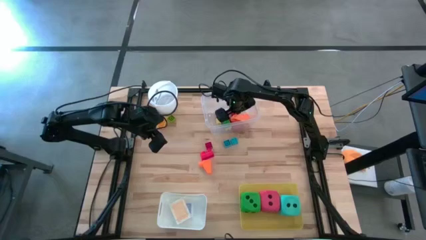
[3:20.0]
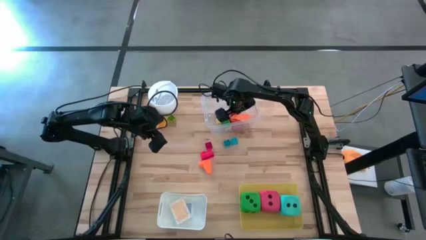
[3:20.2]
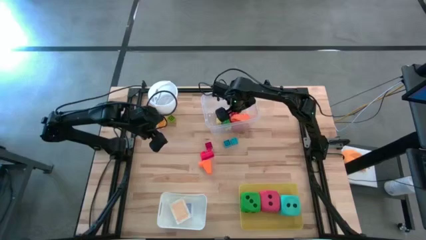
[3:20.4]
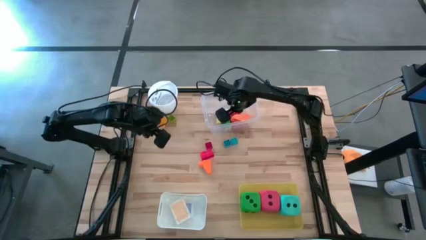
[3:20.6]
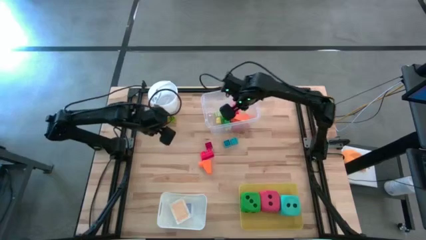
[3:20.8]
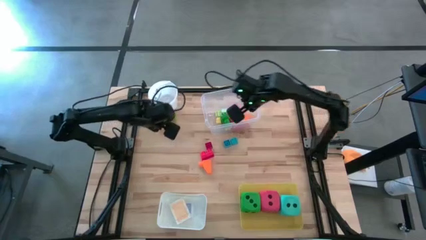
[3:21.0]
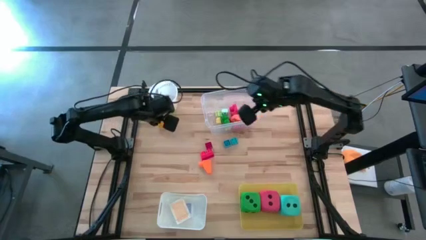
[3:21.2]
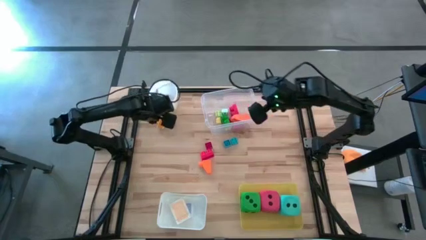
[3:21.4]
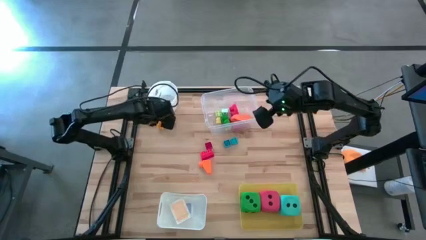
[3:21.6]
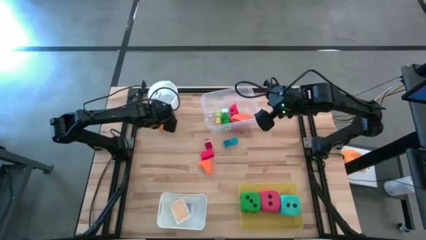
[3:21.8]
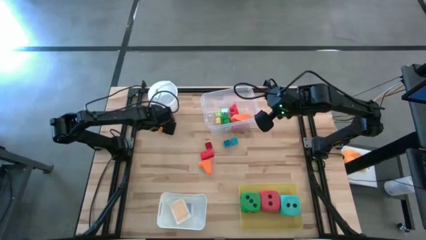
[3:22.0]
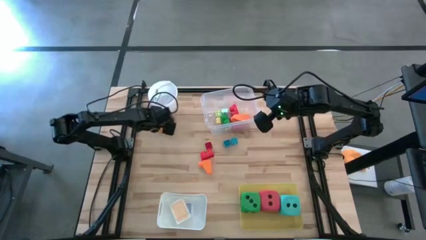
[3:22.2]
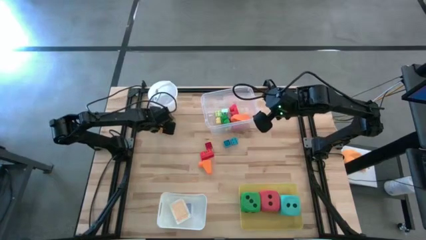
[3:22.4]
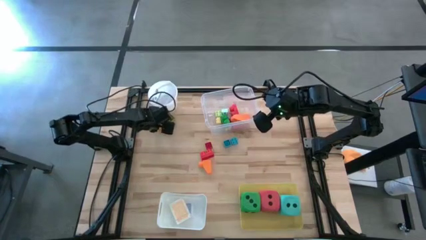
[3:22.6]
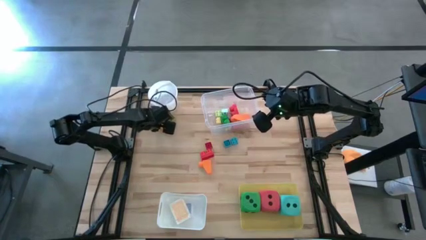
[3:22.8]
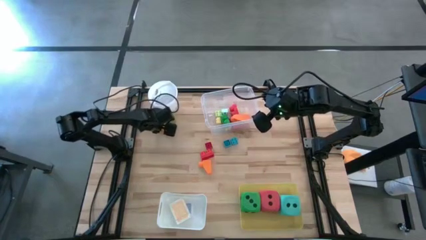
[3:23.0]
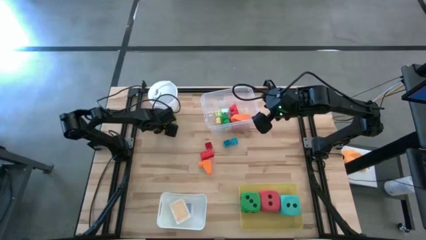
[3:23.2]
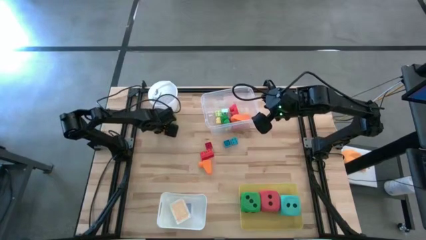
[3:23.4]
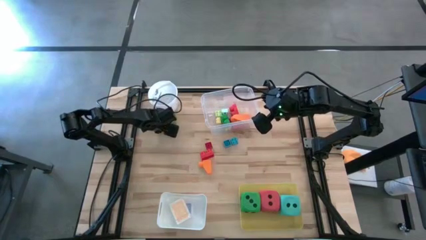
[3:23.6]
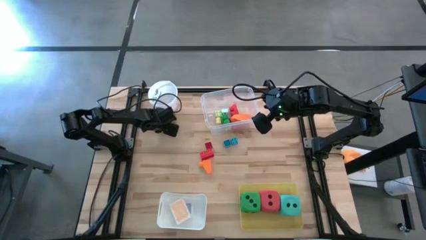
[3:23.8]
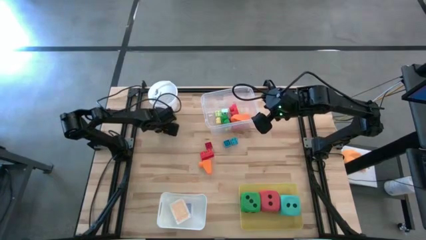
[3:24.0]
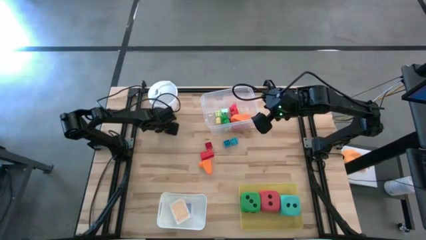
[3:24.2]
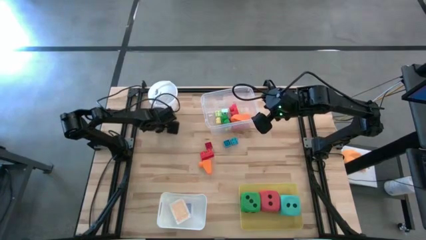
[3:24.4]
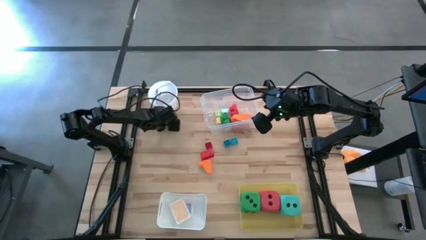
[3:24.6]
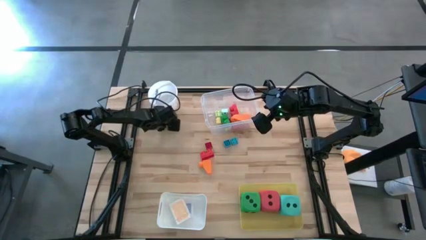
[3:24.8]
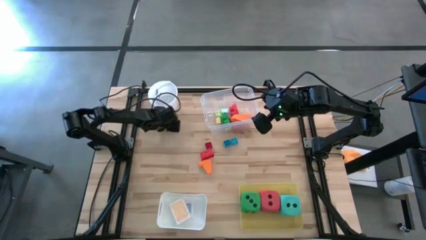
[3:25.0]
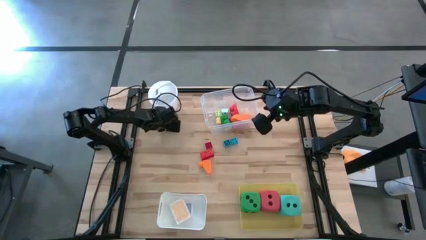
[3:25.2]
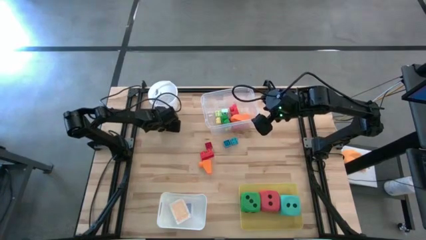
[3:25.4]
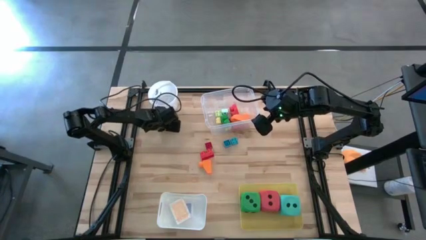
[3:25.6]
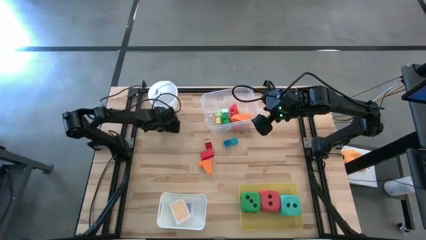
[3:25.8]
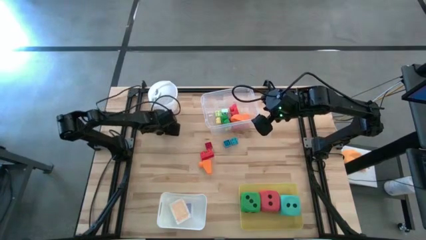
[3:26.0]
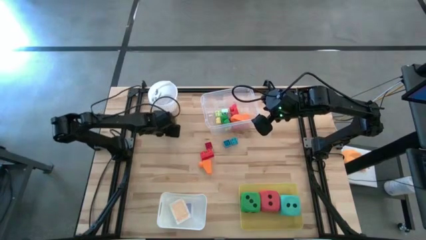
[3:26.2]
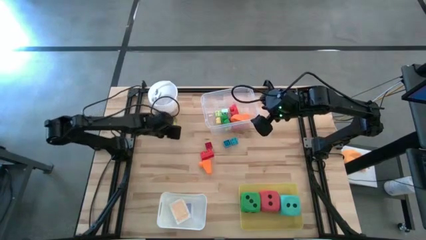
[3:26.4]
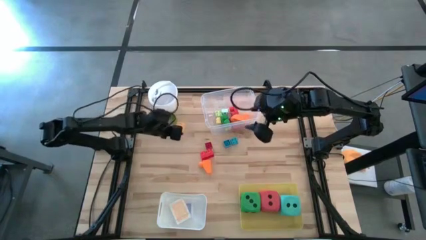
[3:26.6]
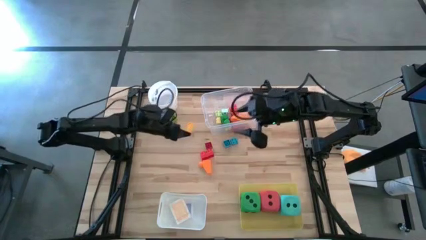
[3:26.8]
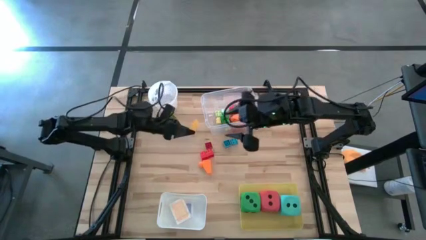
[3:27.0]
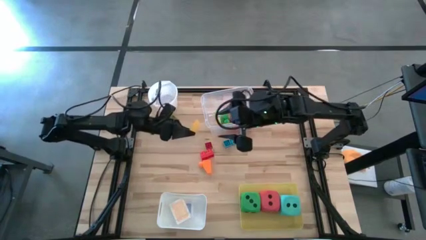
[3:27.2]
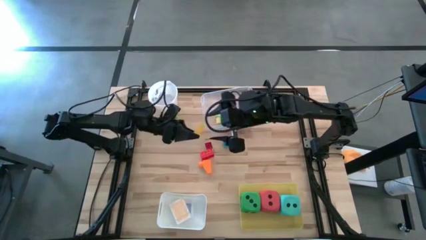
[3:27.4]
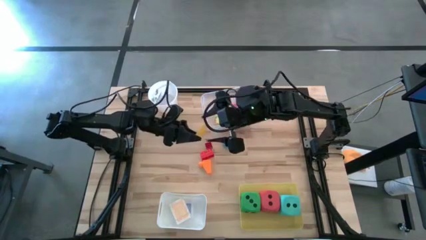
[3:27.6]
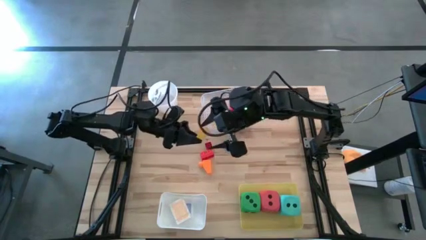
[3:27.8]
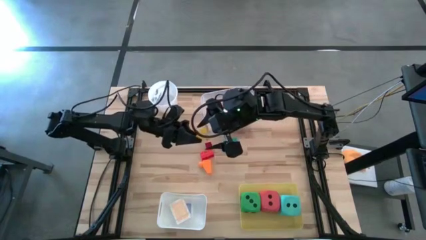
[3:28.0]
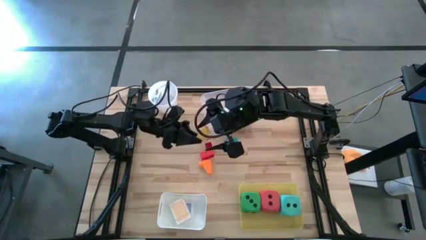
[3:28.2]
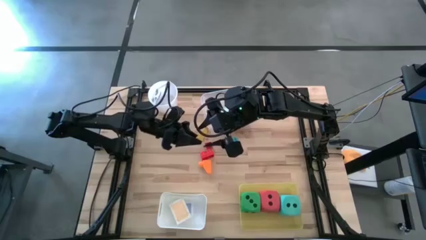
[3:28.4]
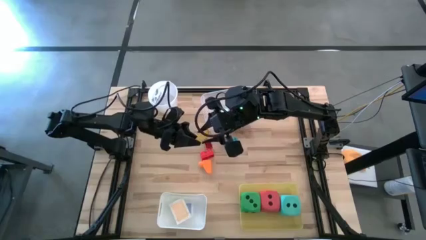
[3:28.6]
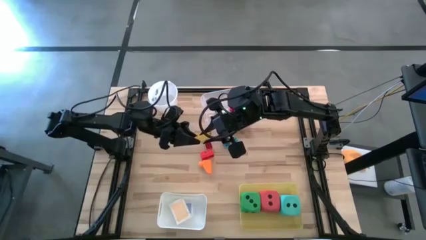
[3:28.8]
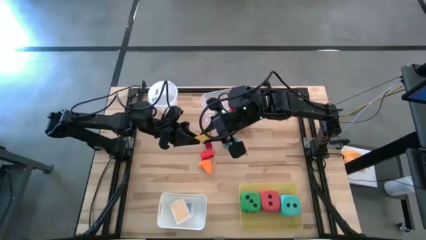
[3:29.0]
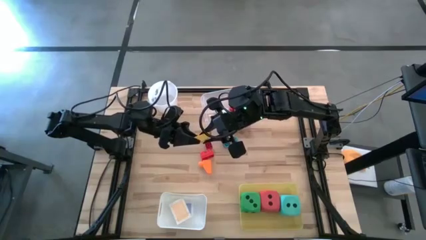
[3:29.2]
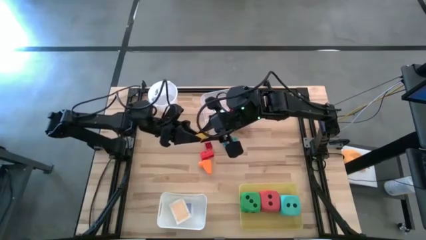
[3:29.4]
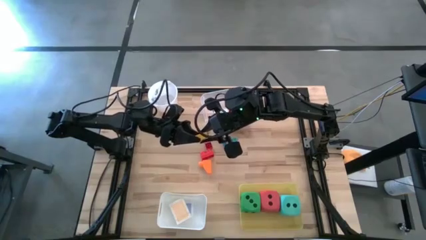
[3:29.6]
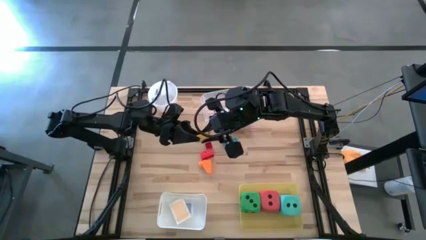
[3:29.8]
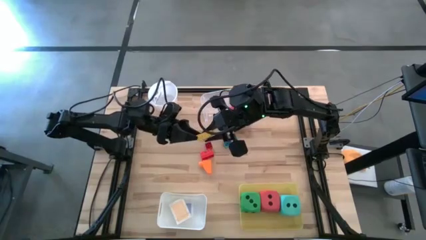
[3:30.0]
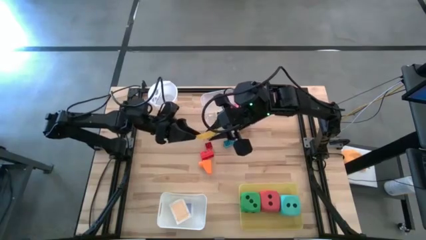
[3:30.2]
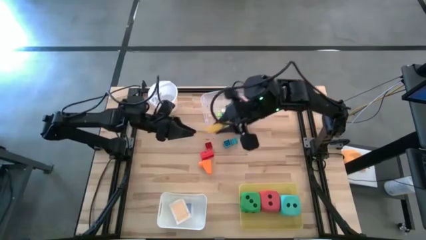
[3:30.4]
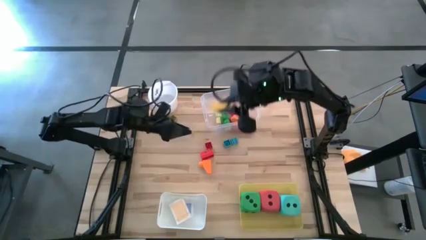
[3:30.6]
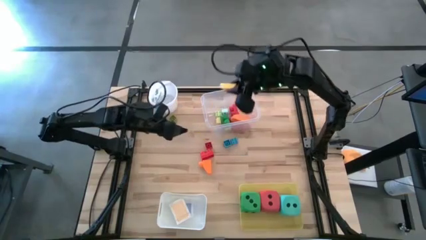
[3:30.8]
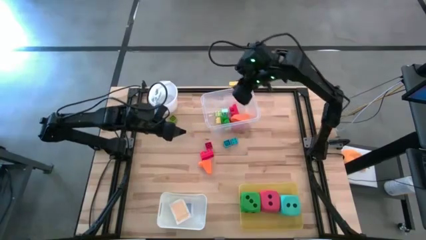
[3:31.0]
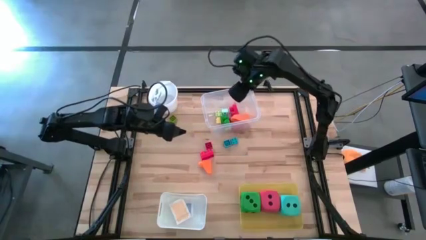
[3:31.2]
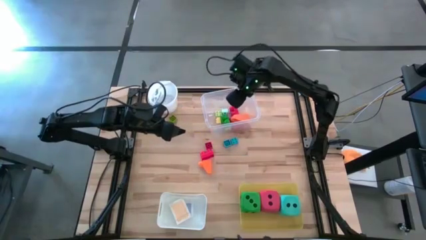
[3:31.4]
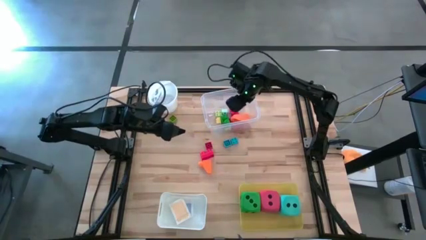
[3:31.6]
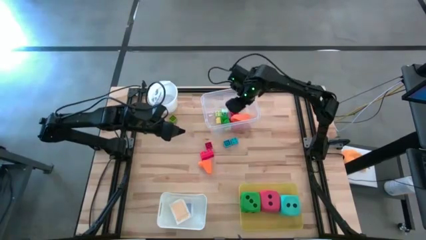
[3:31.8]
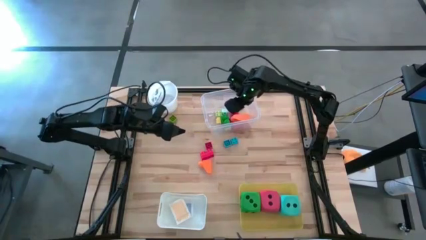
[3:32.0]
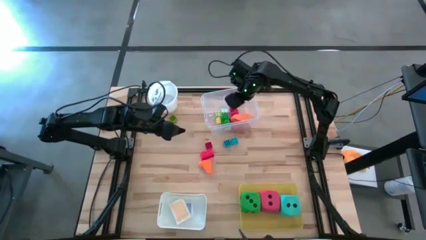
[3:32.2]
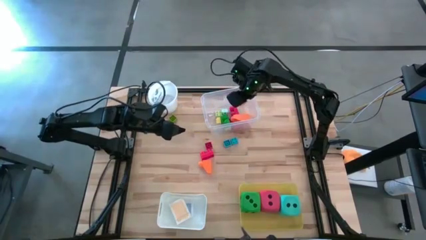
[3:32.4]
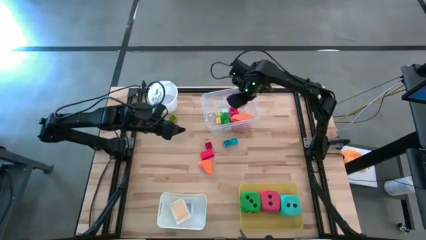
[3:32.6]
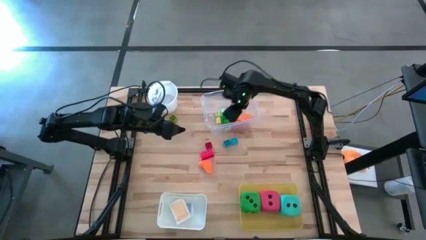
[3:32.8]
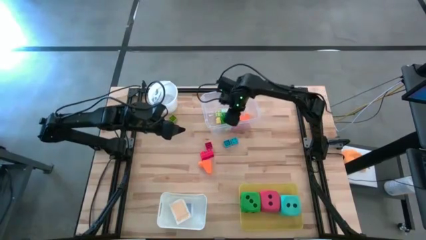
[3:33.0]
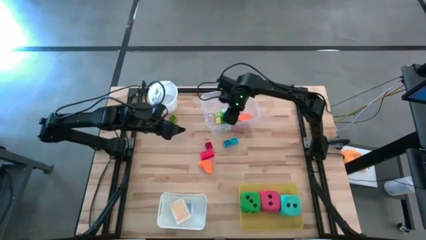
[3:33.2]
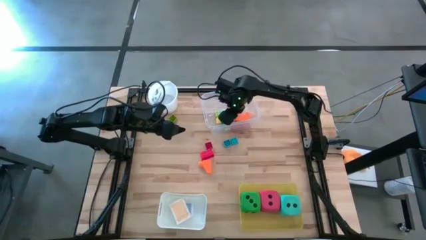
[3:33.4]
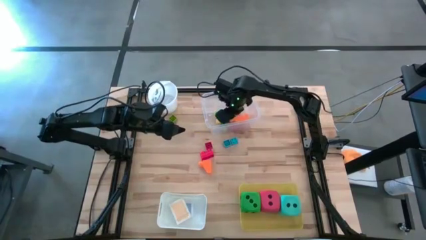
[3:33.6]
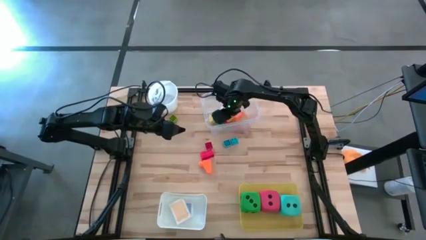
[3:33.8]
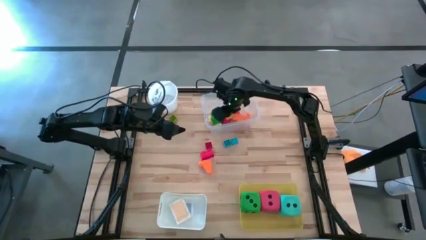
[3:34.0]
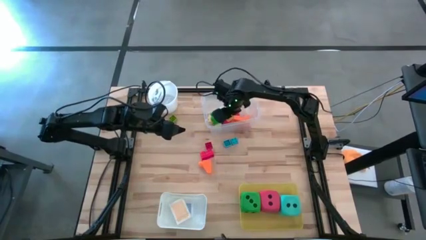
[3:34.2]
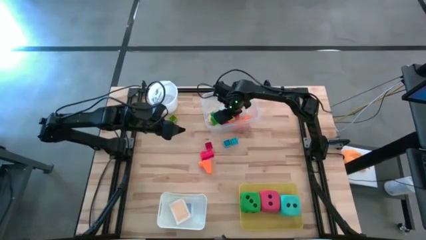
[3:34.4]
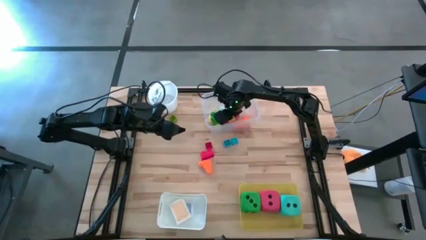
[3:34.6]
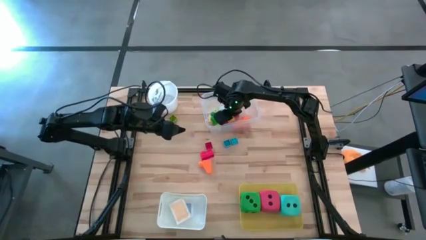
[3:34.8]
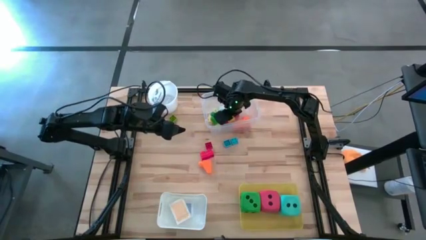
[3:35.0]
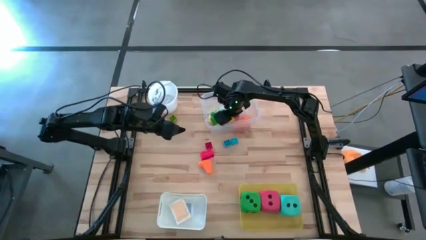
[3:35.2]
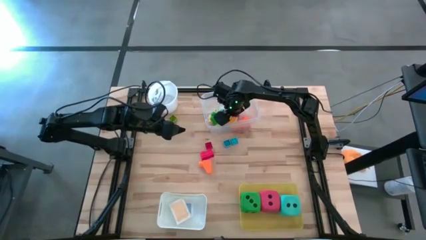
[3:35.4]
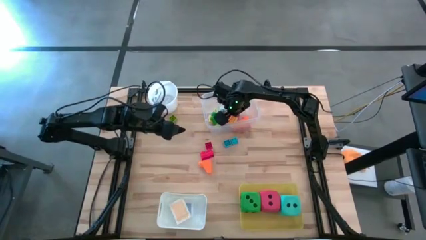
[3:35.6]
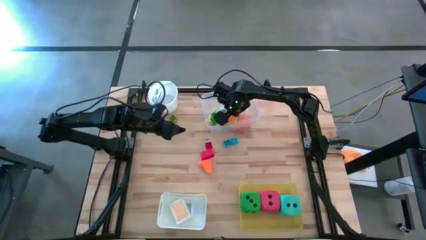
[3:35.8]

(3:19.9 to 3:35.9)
Task: Pick & Place Toys
Put the yellow game piece into the transparent bin
